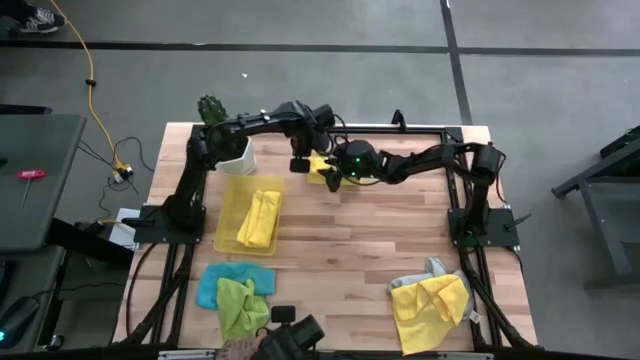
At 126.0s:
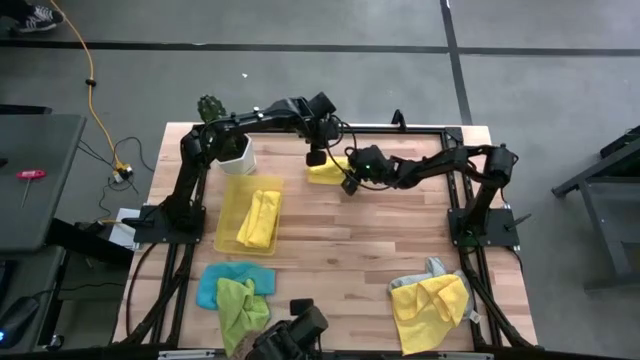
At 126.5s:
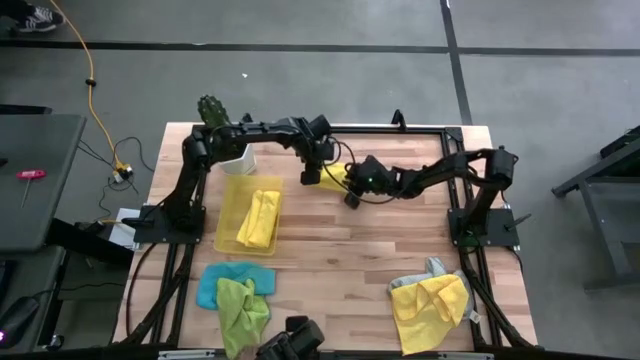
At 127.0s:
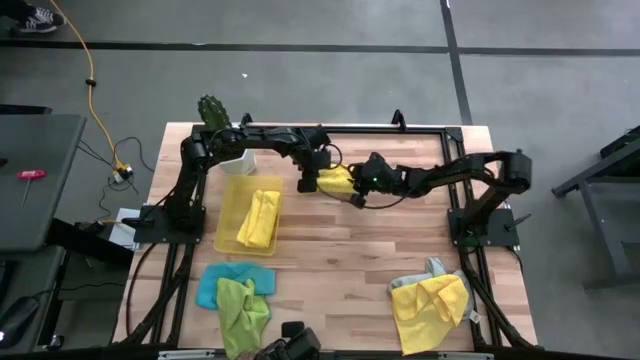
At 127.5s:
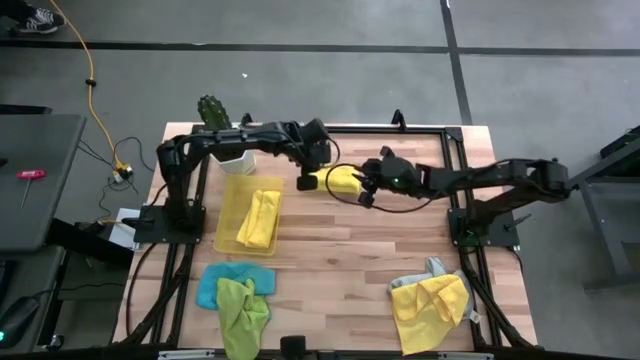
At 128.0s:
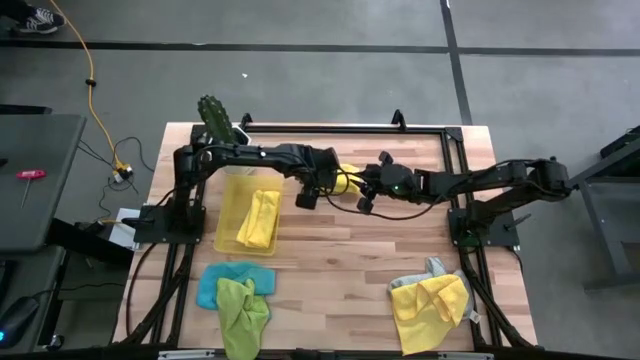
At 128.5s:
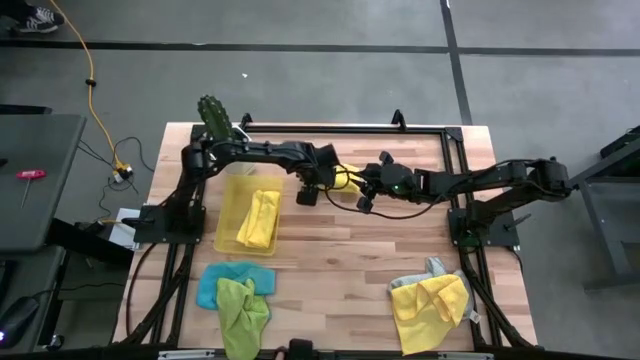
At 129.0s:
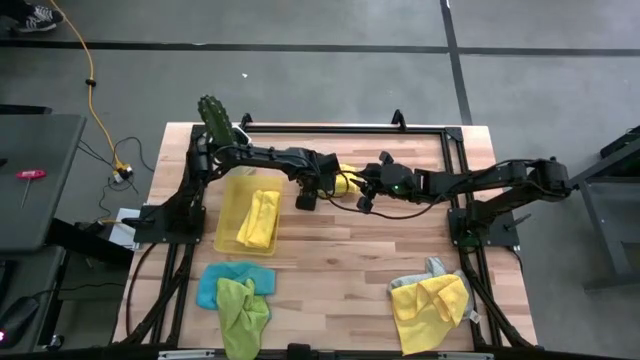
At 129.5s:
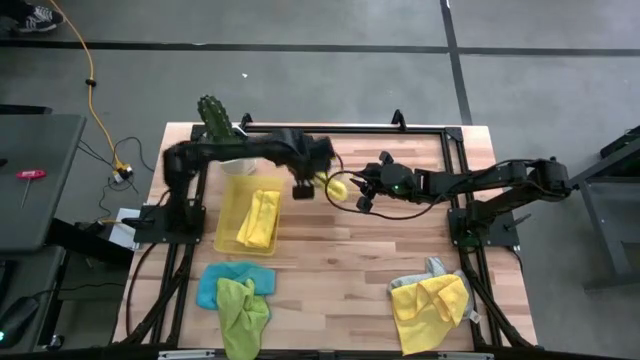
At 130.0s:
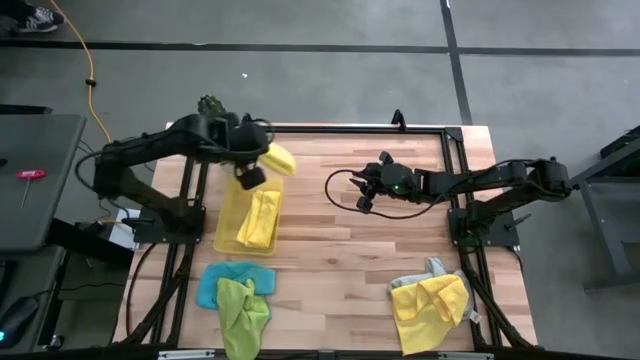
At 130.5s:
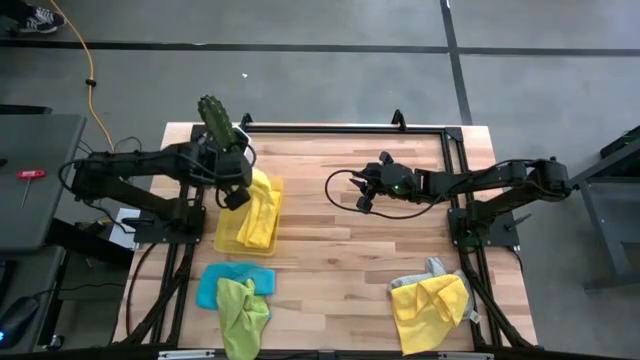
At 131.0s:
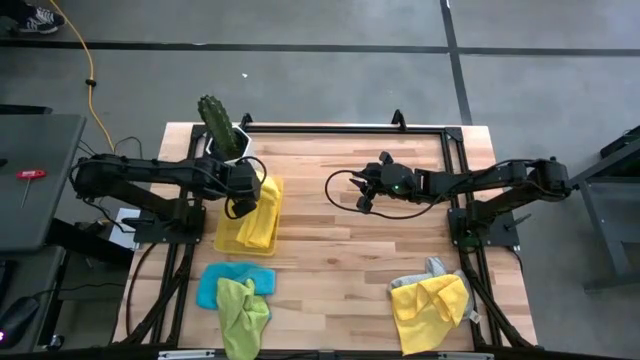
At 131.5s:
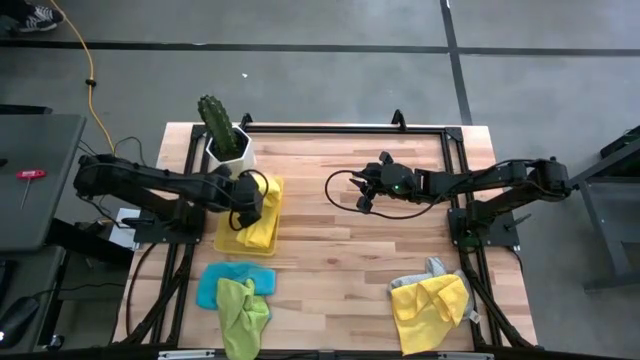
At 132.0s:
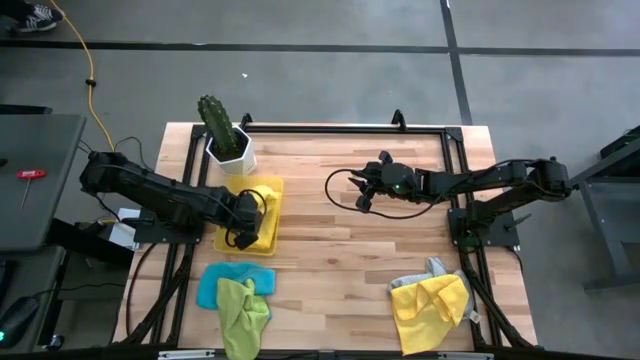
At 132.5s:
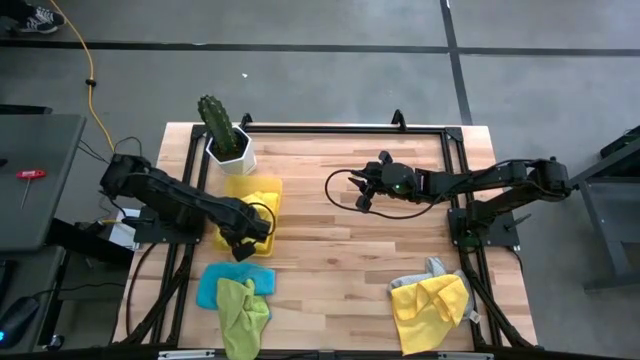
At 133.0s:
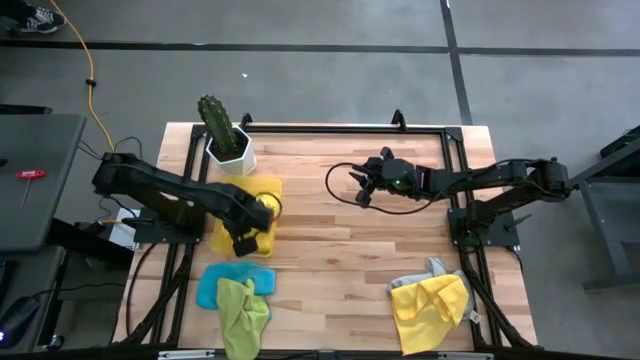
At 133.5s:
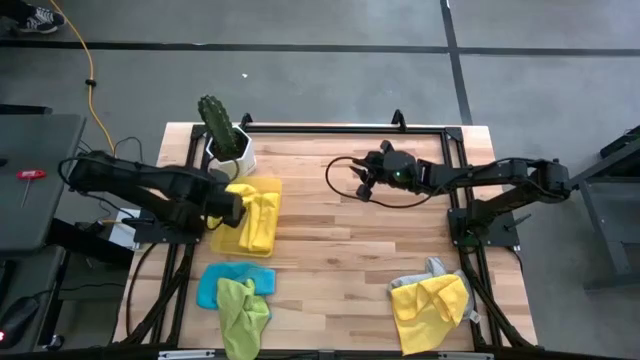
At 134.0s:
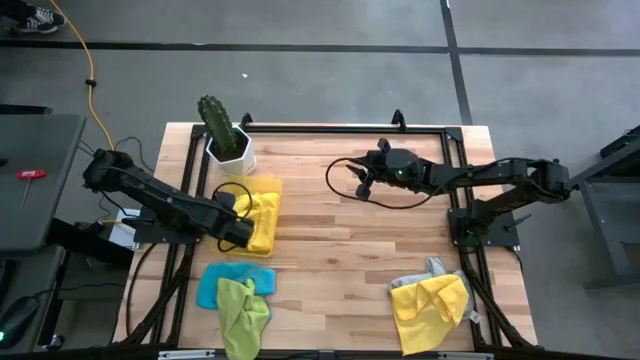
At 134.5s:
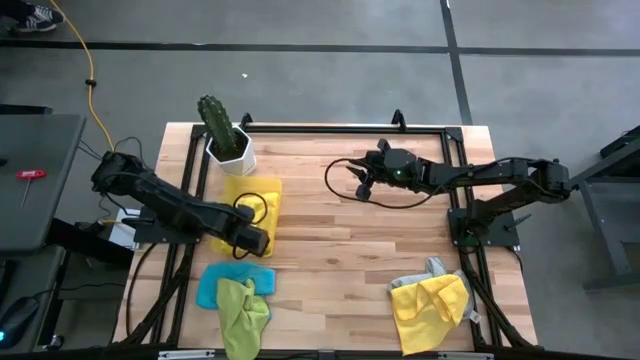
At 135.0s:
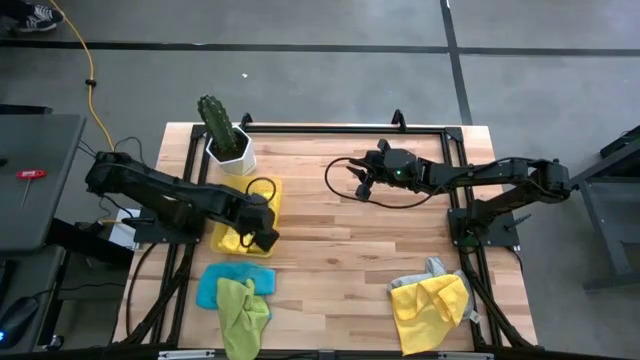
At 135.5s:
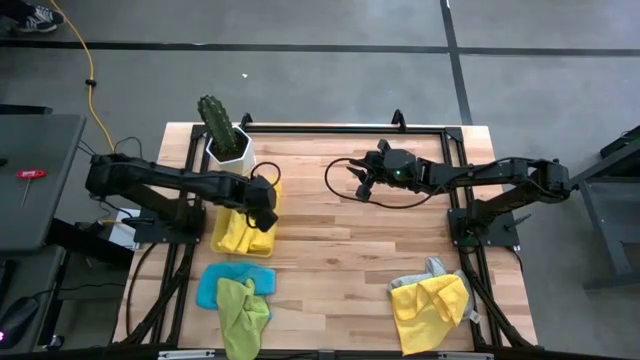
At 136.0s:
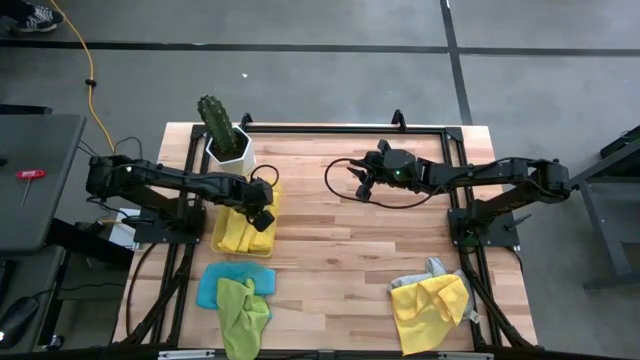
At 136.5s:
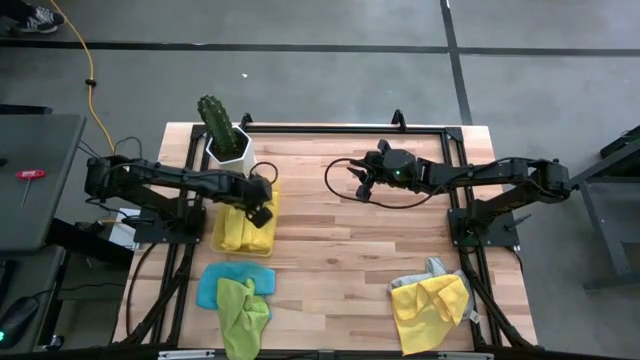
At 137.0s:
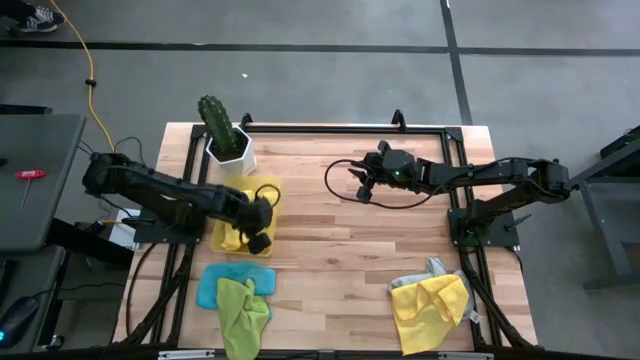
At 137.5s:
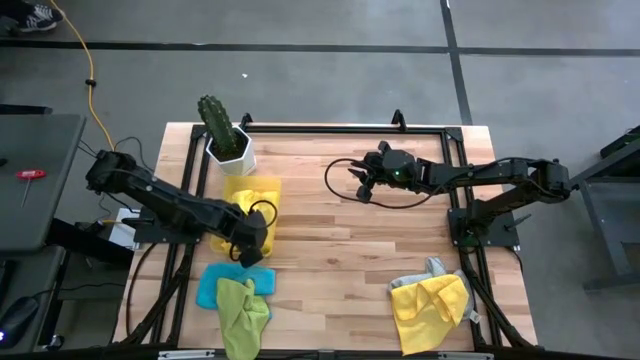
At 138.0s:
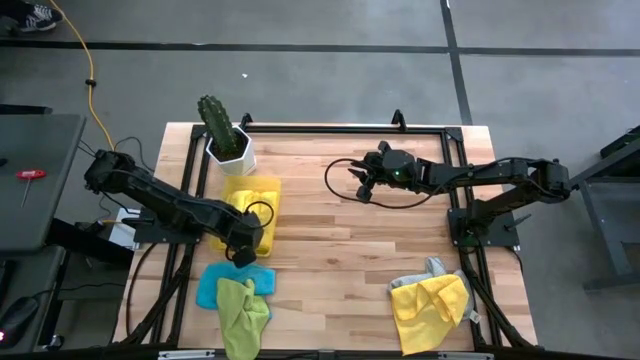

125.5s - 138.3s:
Task: Fold microfiber towels
Put the folded yellow microfiber towel into the yellow bin

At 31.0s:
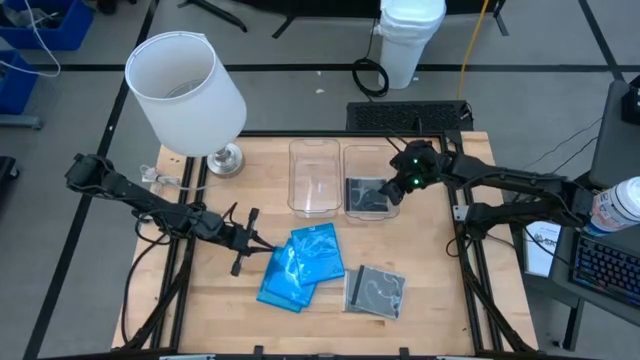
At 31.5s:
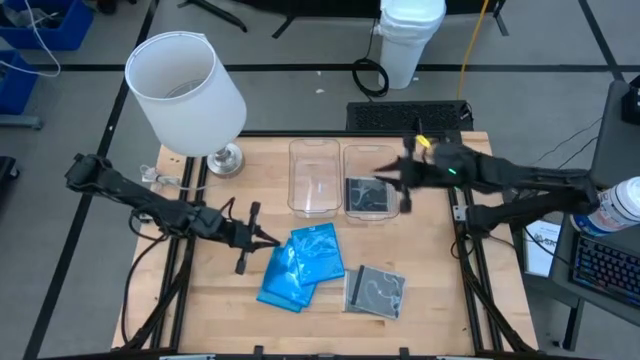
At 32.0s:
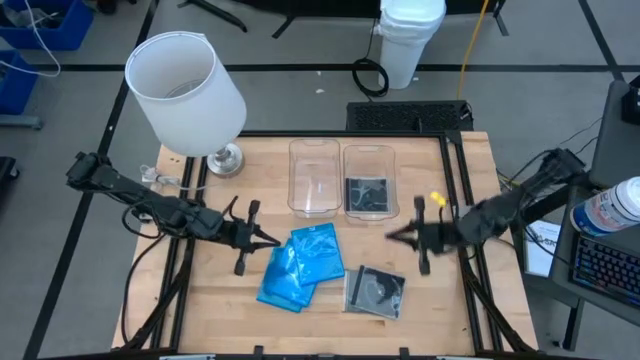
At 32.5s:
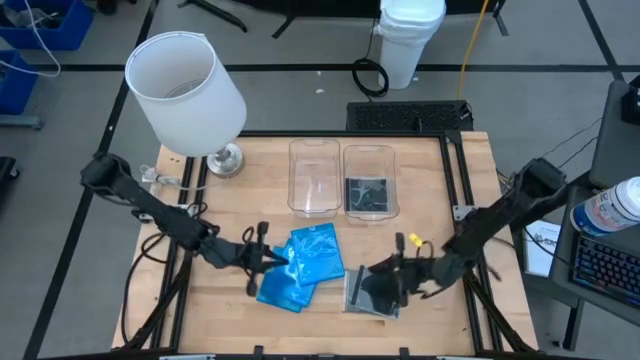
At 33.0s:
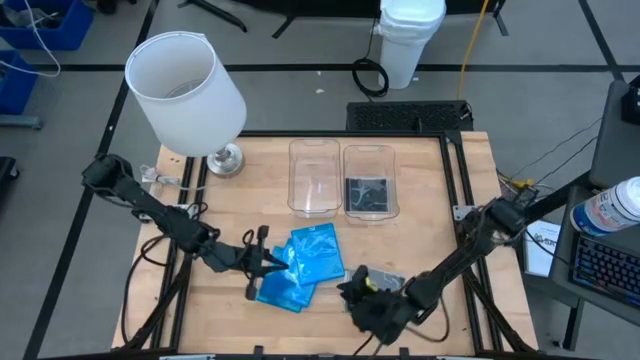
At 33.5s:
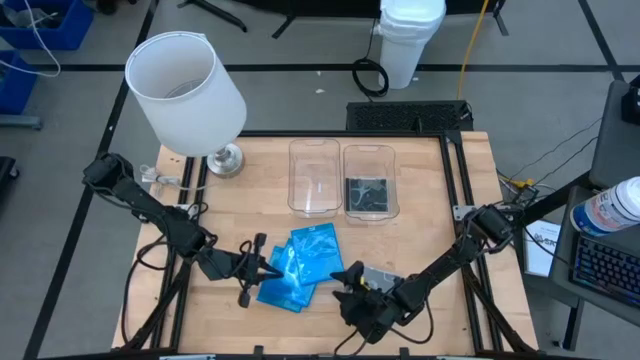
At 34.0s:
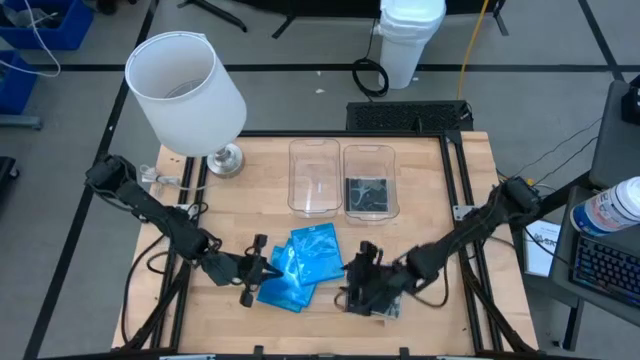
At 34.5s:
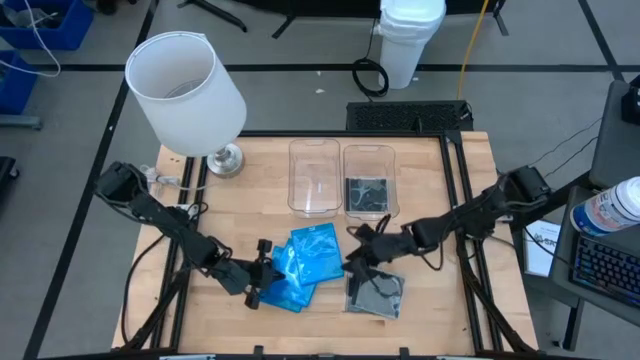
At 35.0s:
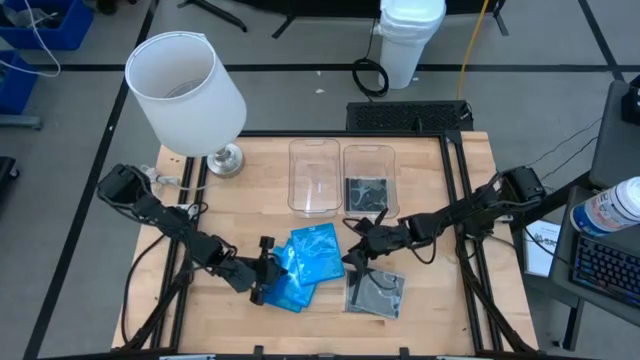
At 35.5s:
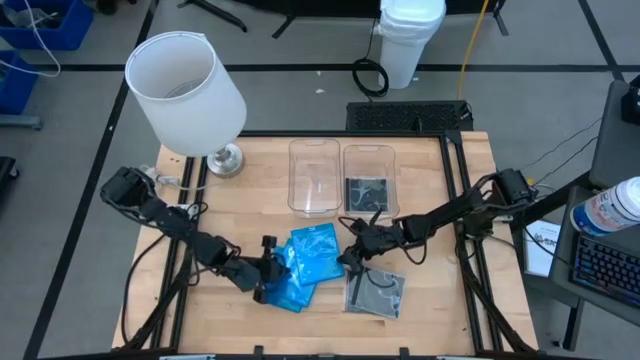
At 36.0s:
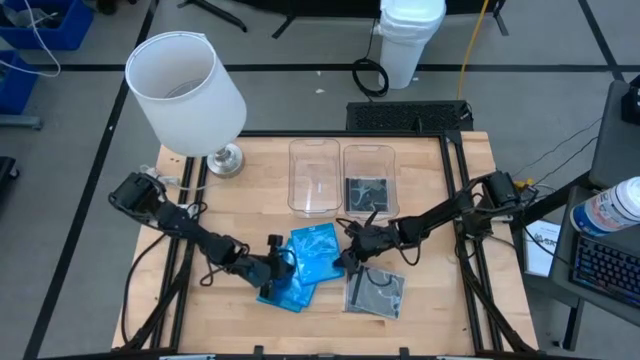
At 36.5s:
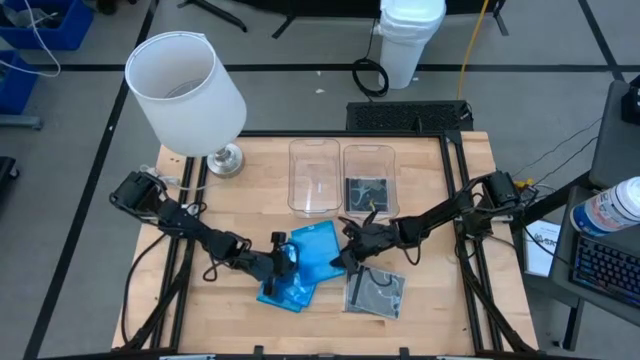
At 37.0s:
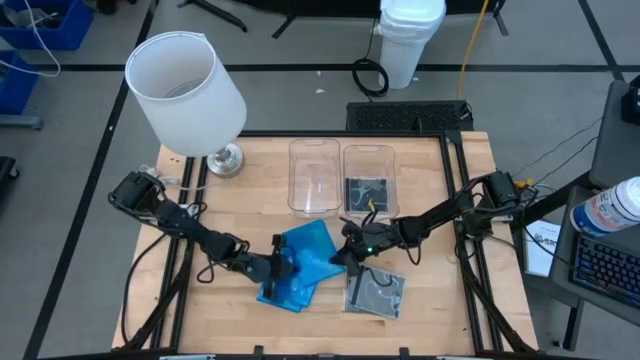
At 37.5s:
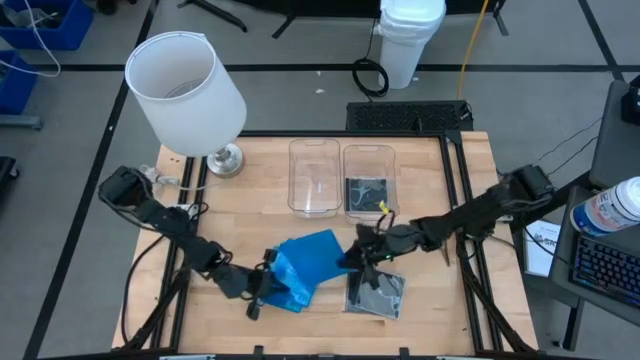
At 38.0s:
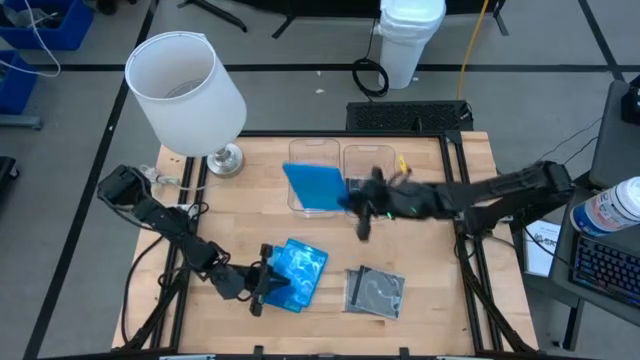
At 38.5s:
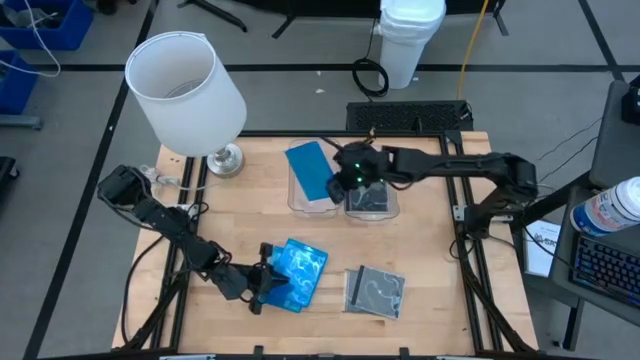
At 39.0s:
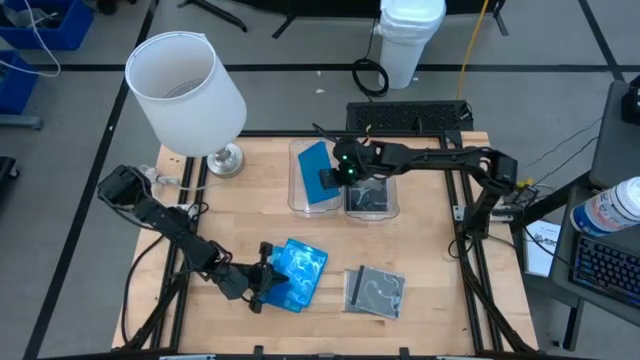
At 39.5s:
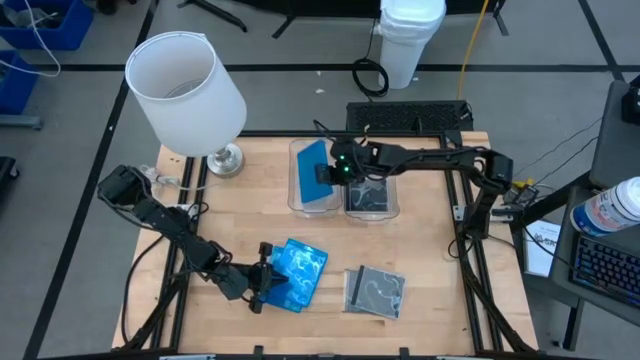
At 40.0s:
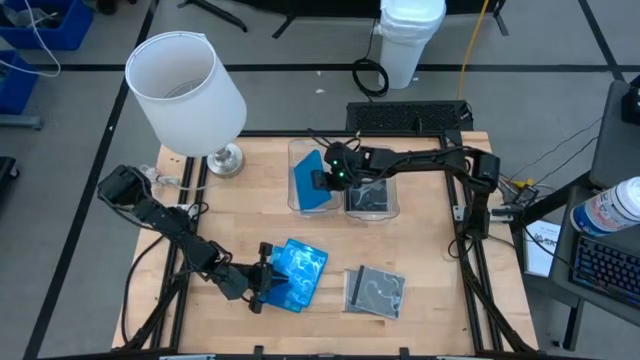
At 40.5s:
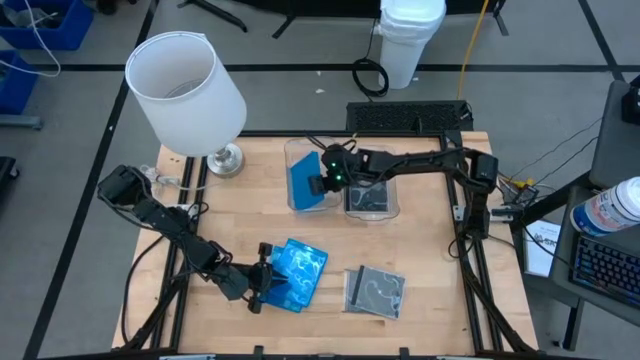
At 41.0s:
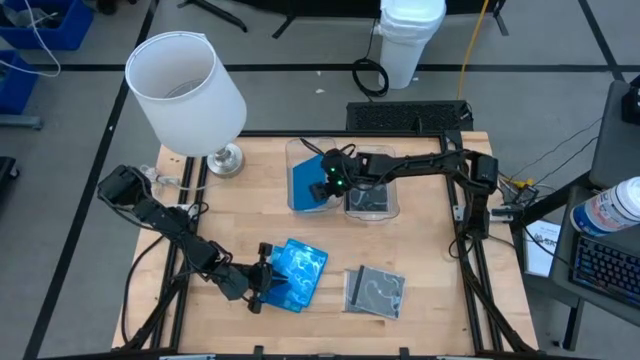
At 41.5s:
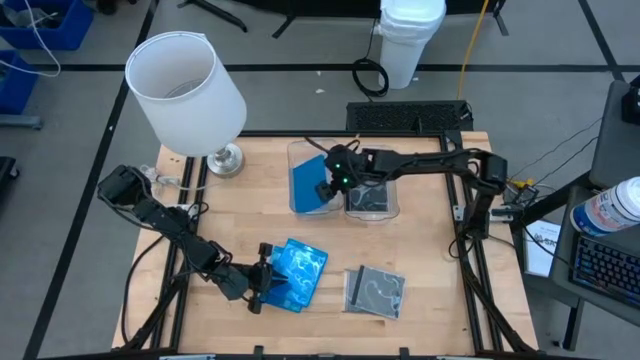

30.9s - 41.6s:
Task: Pick & place jewel cases by type
Put the top blue CD case into the left transparent bin
